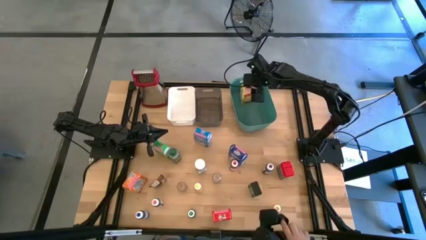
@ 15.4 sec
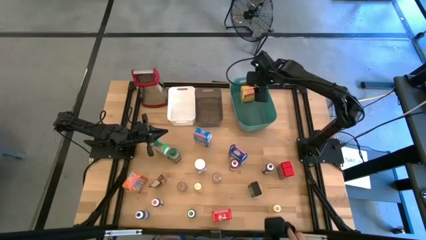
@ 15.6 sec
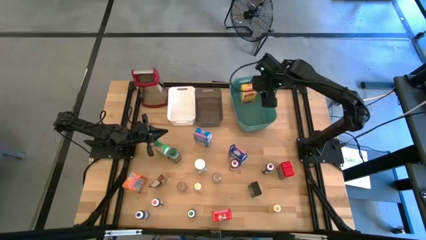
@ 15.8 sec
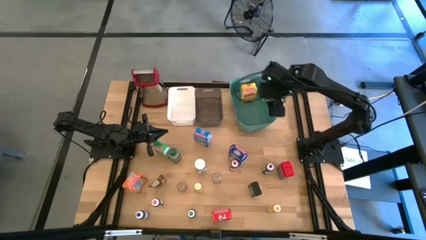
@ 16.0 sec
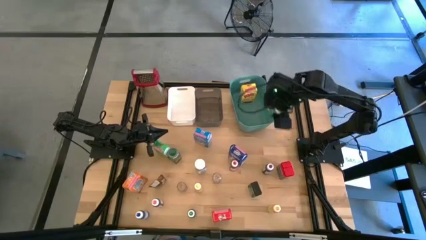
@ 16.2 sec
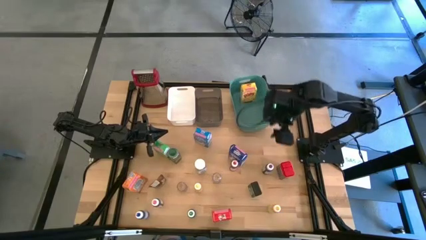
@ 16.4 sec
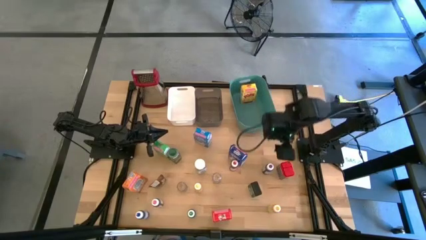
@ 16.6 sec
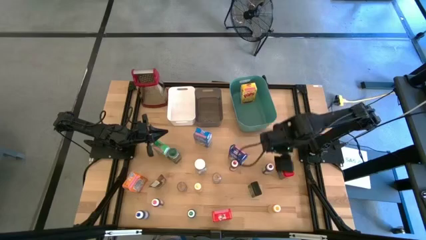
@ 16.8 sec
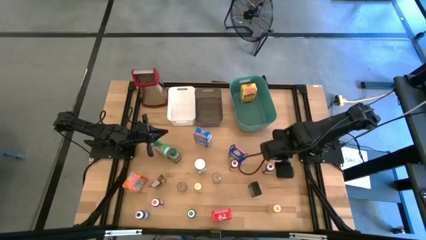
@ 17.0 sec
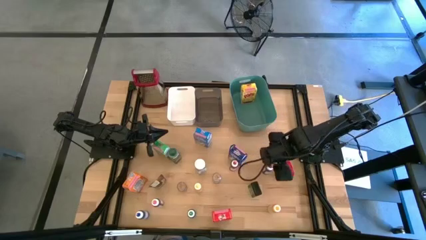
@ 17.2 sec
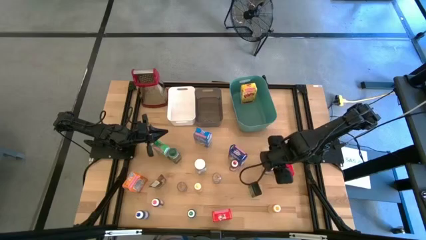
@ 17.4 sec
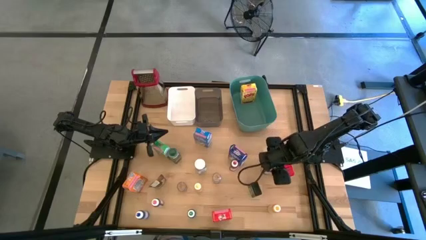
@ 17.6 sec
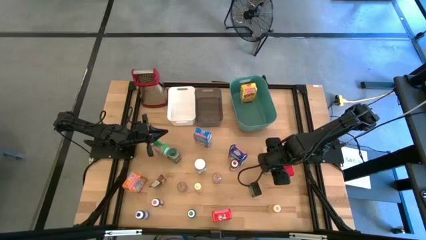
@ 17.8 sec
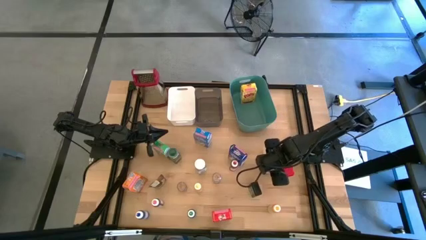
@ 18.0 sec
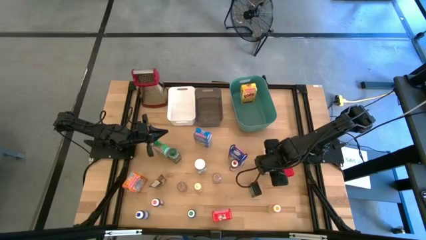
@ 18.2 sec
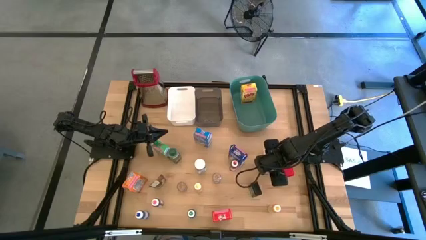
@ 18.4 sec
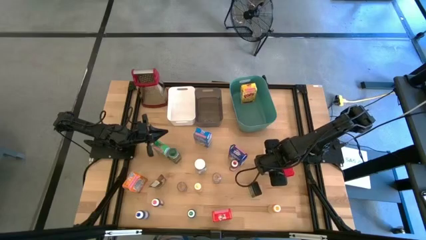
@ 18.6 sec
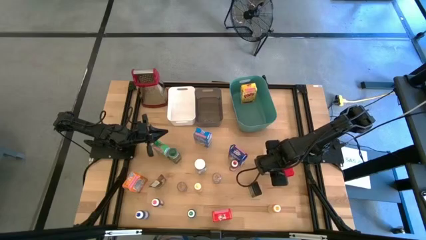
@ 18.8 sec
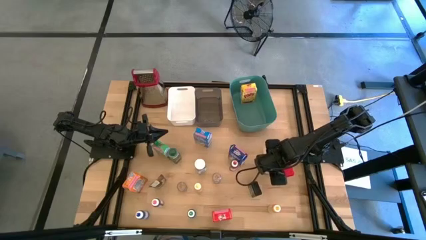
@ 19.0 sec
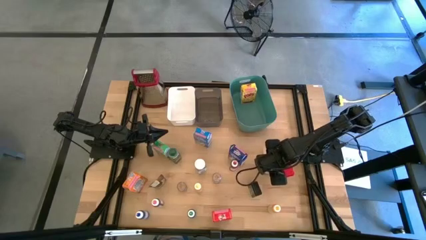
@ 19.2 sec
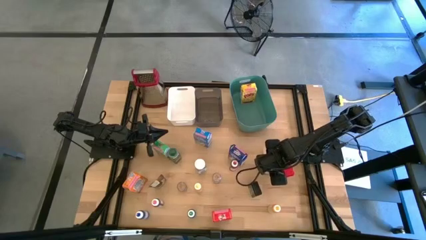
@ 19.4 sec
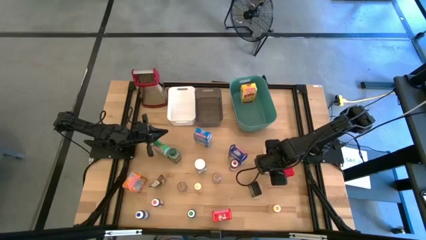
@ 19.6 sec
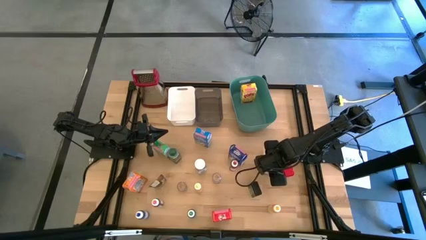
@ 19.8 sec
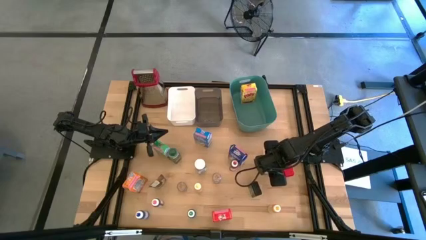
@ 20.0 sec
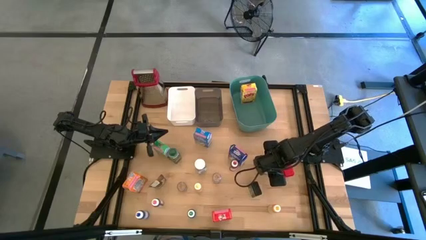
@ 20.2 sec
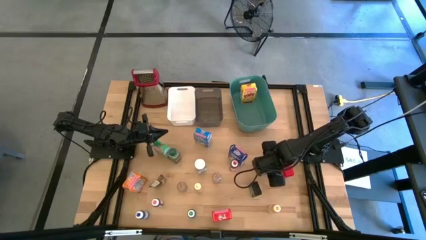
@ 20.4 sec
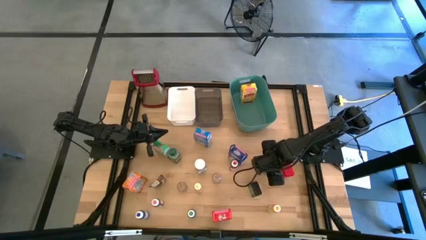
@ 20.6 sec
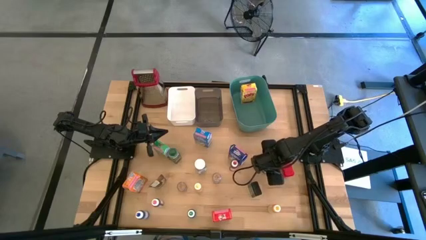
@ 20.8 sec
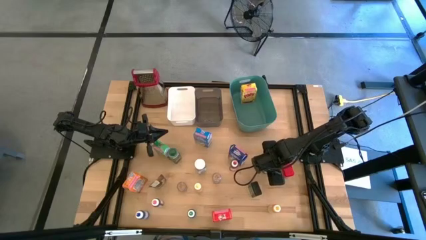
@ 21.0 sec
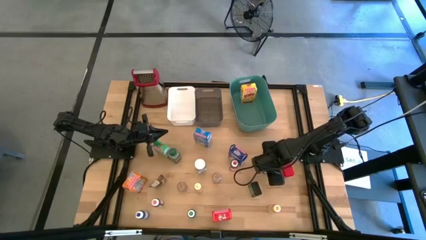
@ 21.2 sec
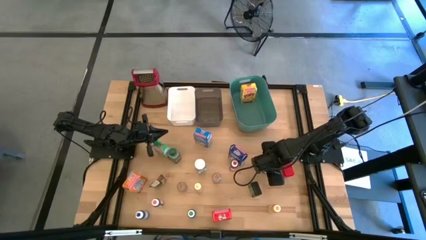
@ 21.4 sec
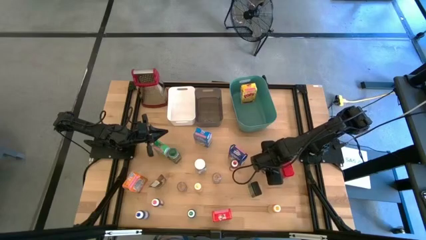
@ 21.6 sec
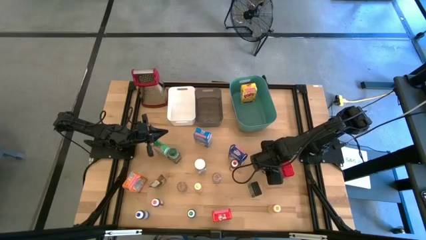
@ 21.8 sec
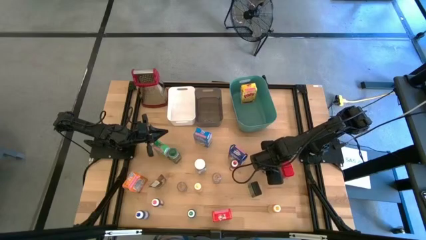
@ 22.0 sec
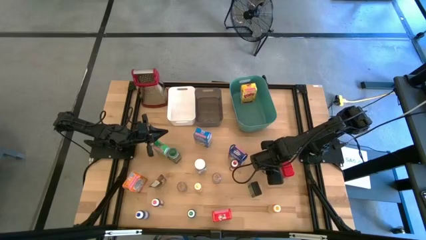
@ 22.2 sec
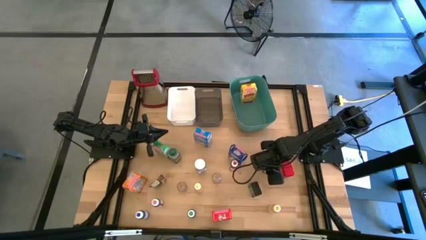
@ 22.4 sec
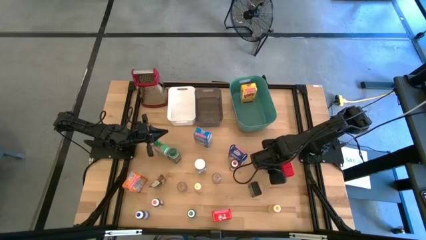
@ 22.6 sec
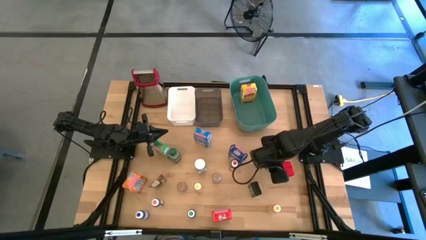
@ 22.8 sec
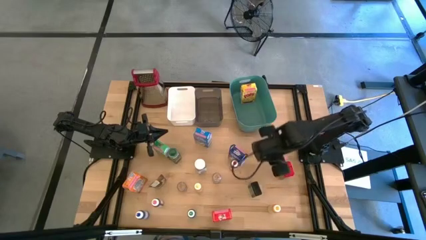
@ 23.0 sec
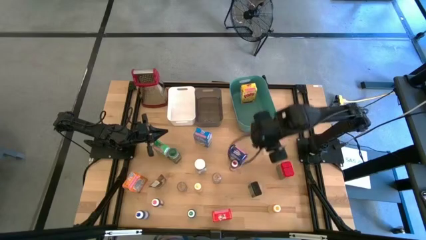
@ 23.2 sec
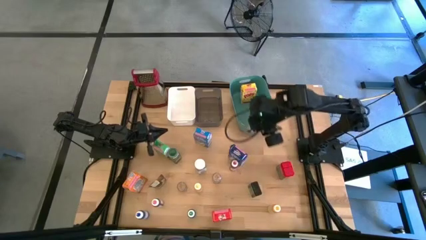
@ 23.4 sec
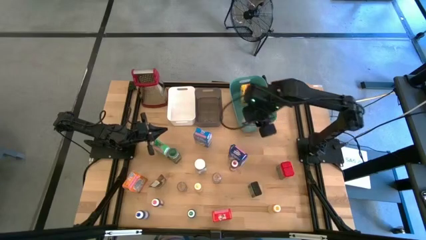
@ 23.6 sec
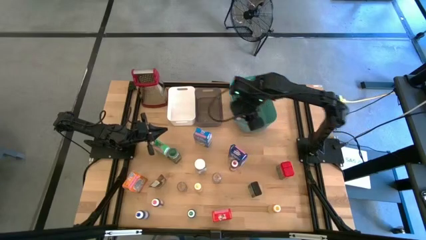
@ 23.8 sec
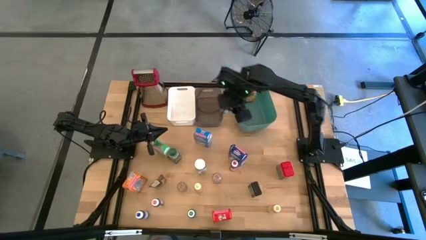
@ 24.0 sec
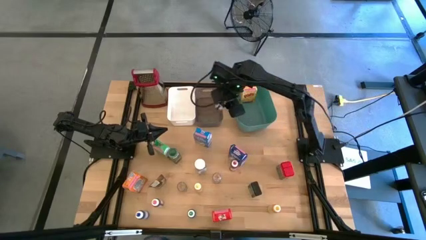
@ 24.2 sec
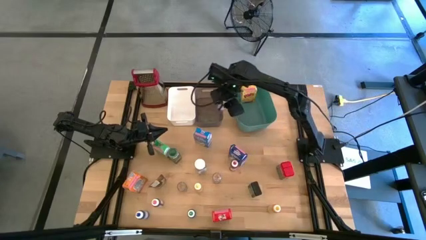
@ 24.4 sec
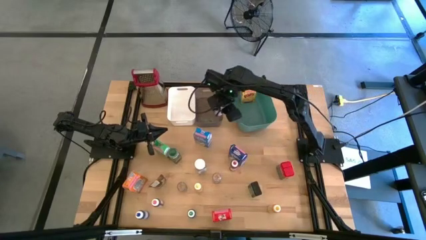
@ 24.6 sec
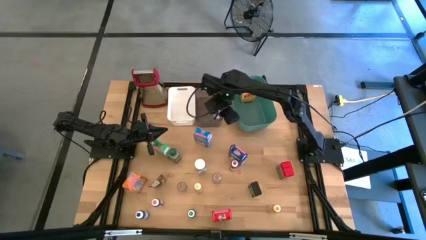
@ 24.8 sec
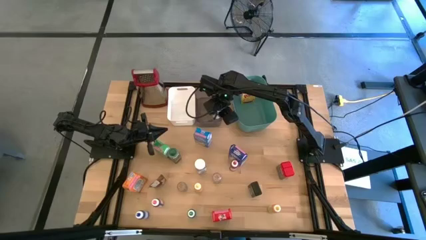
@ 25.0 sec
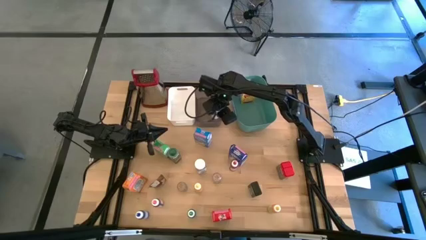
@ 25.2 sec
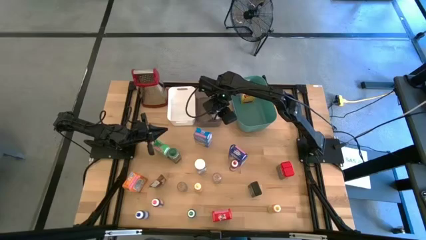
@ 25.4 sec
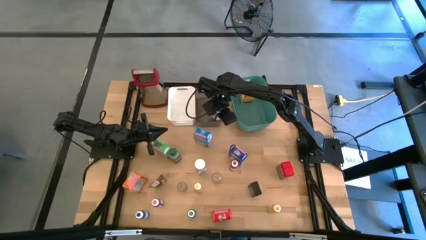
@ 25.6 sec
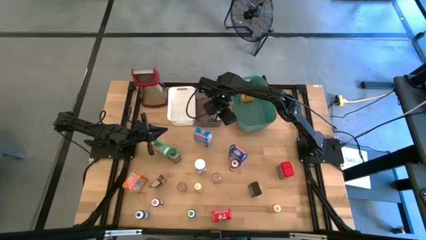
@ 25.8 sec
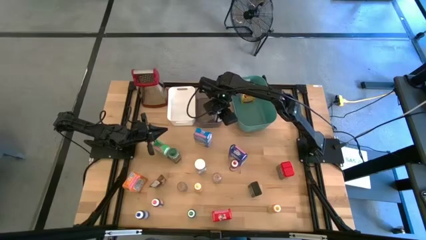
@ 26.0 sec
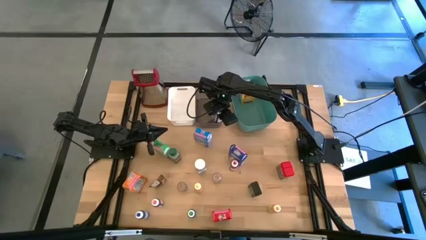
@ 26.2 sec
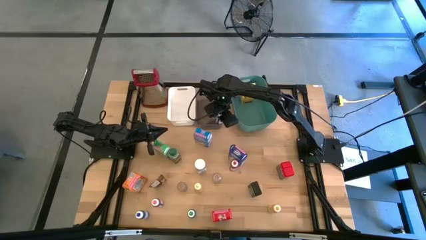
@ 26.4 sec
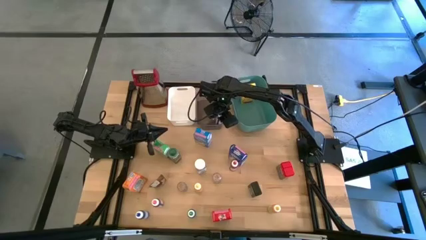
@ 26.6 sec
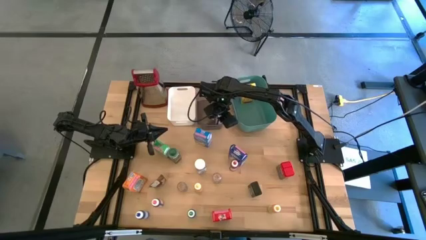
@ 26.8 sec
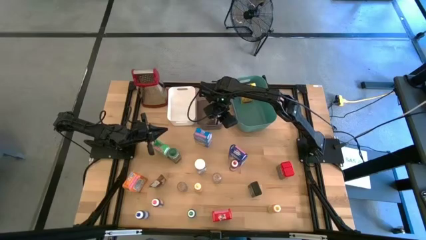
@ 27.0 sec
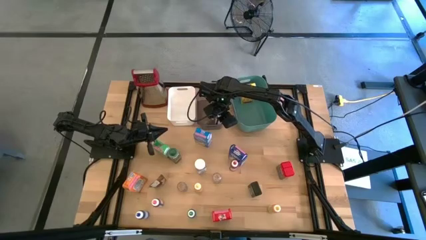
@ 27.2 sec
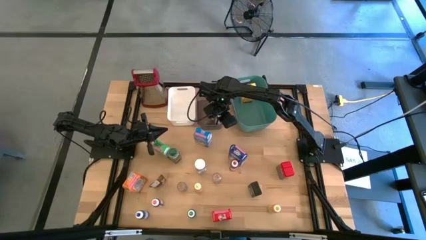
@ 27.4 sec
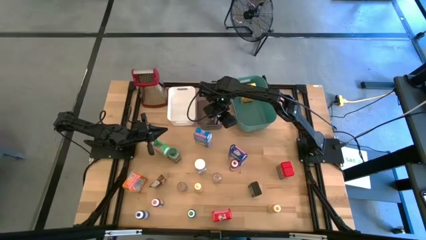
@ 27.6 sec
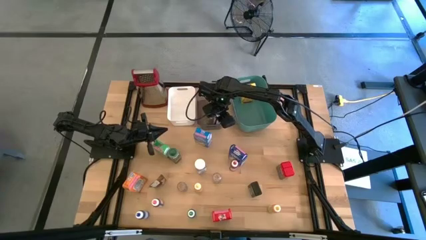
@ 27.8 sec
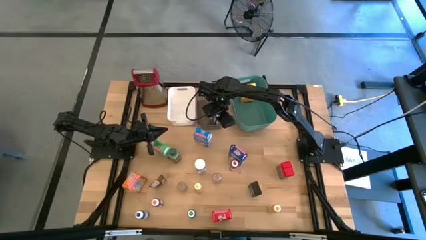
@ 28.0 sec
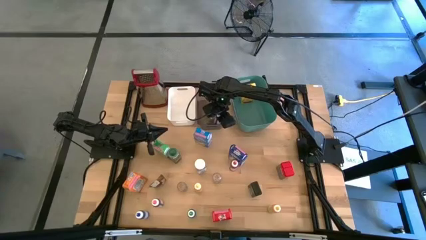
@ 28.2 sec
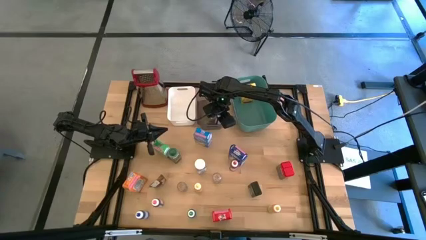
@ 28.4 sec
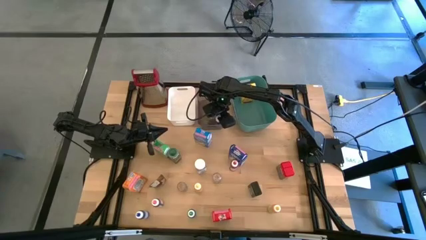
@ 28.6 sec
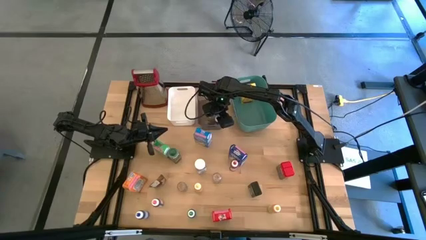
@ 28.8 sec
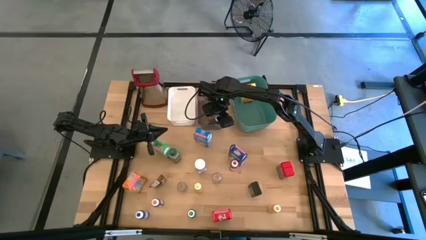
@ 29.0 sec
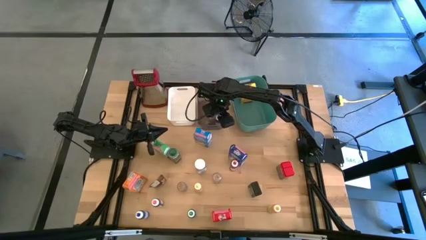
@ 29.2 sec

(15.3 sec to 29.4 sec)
Task: Pick & Place Kitchen Items
Put the purple food coloring bottle into the middle black transparent bin
